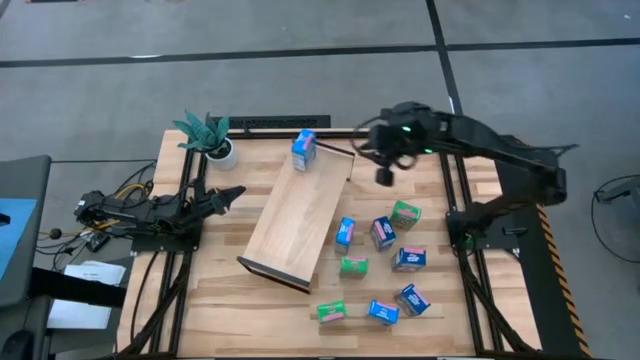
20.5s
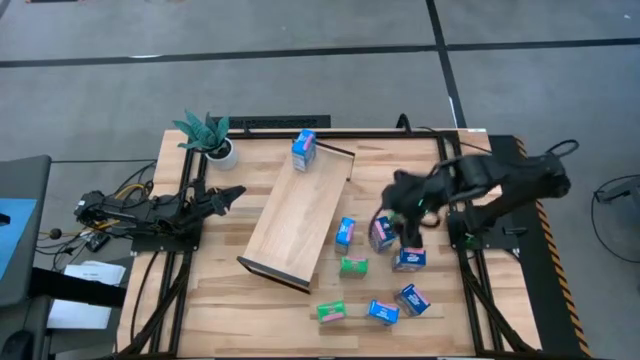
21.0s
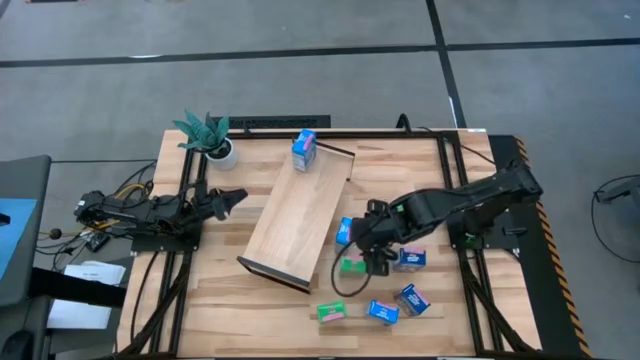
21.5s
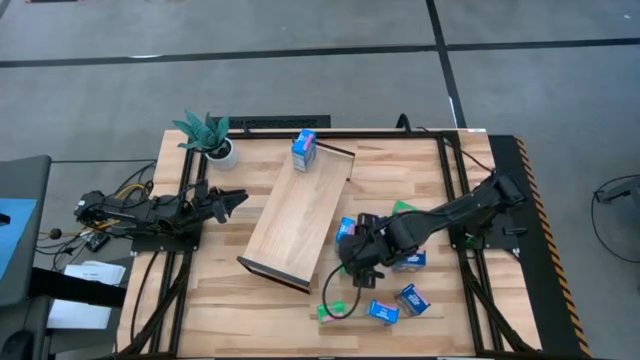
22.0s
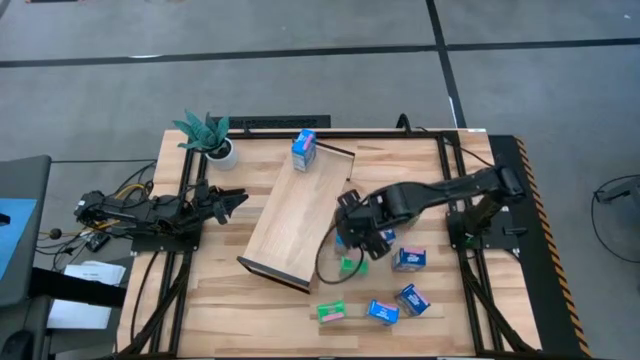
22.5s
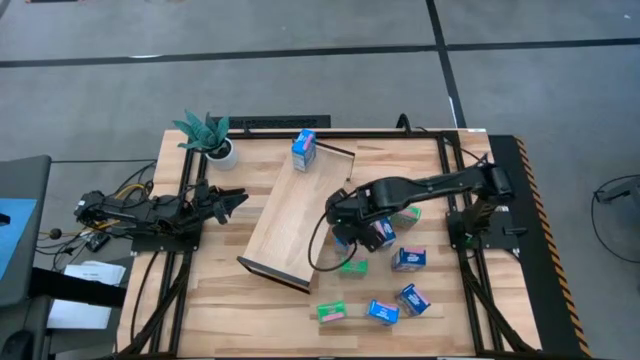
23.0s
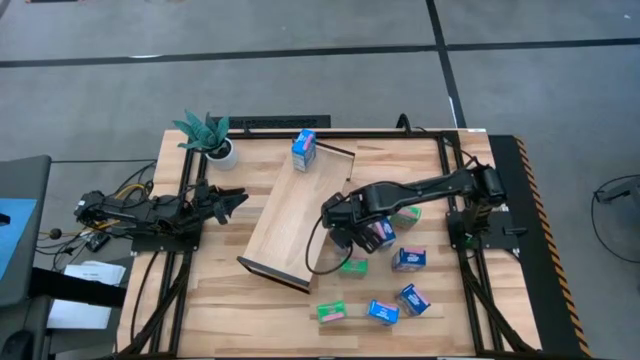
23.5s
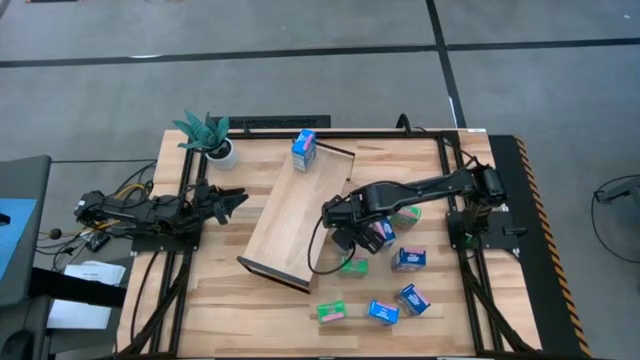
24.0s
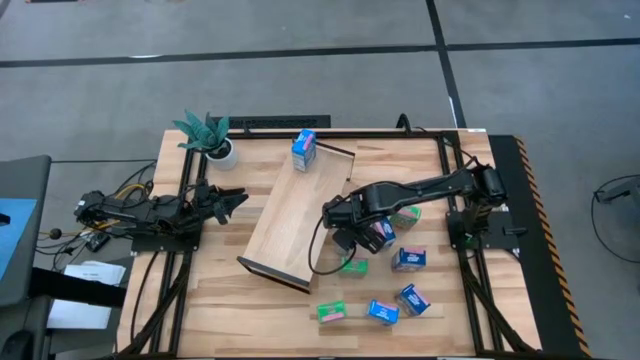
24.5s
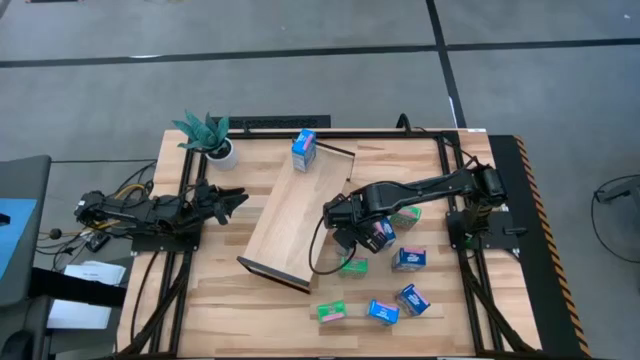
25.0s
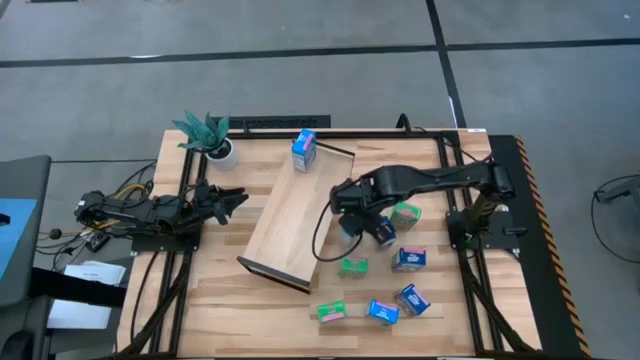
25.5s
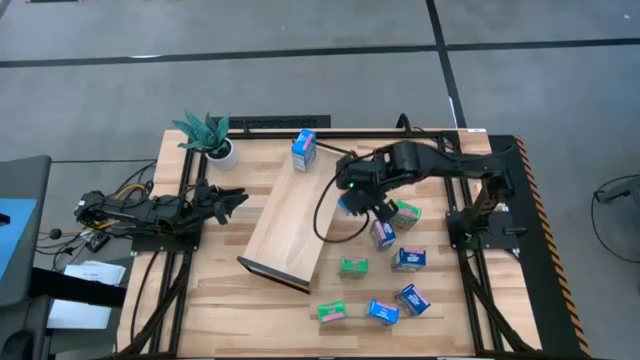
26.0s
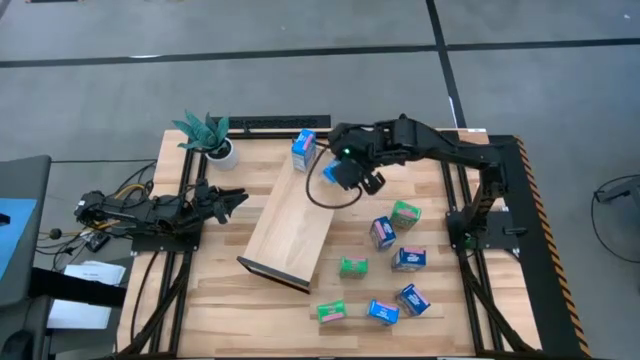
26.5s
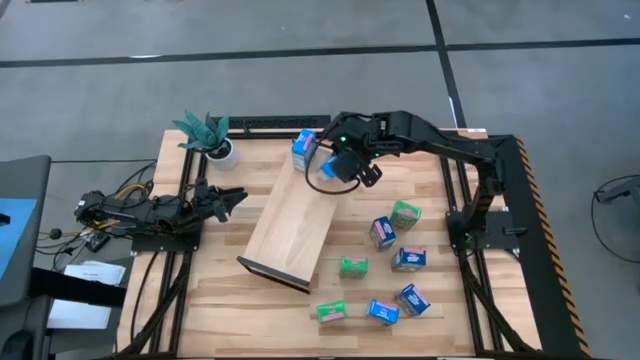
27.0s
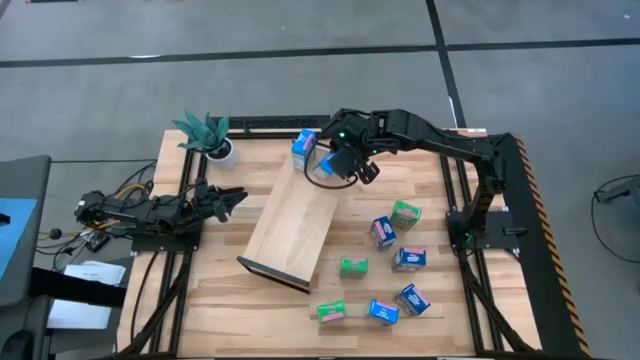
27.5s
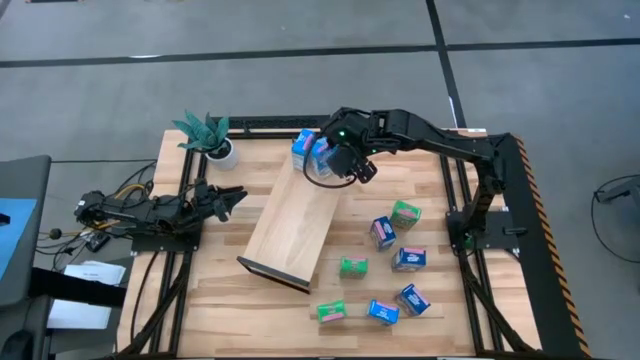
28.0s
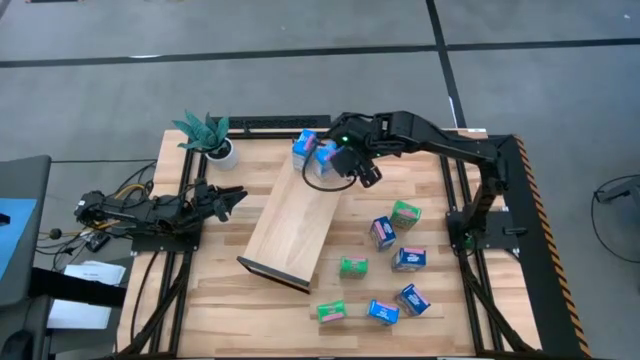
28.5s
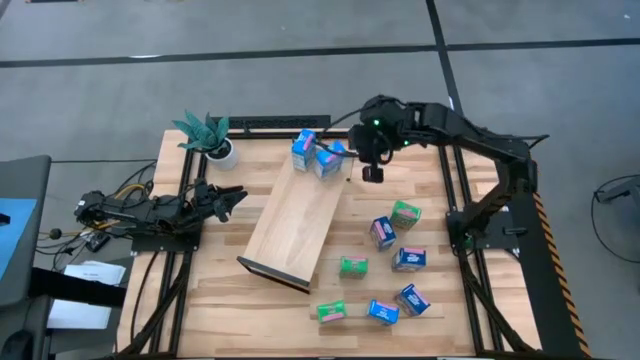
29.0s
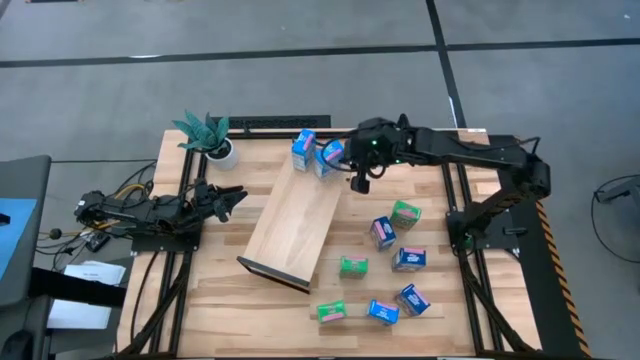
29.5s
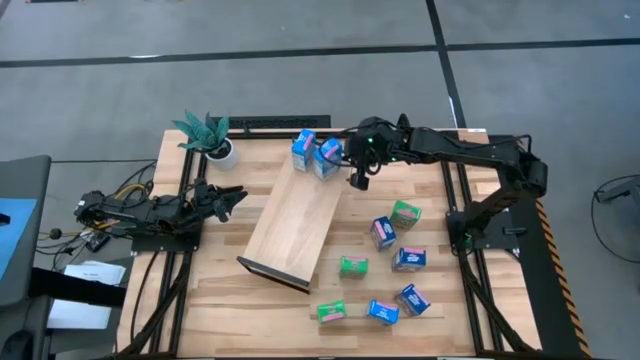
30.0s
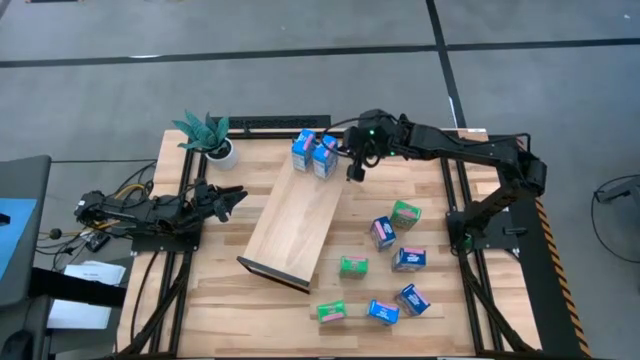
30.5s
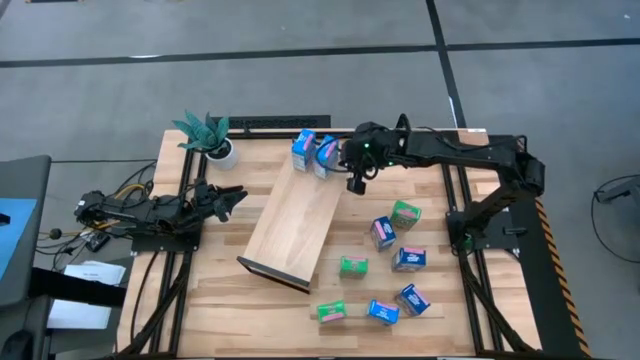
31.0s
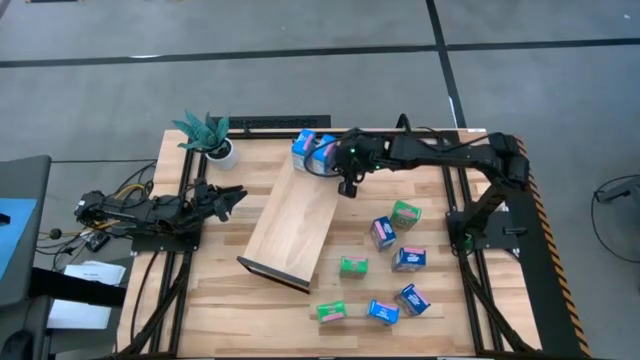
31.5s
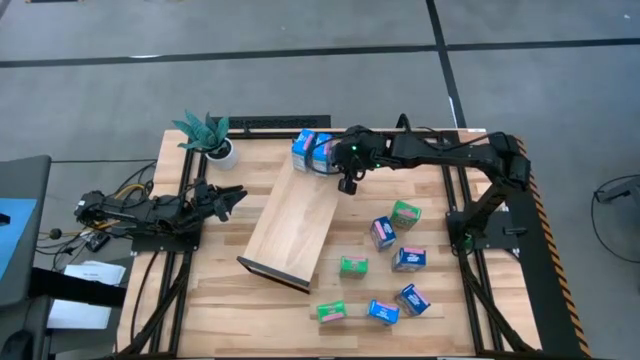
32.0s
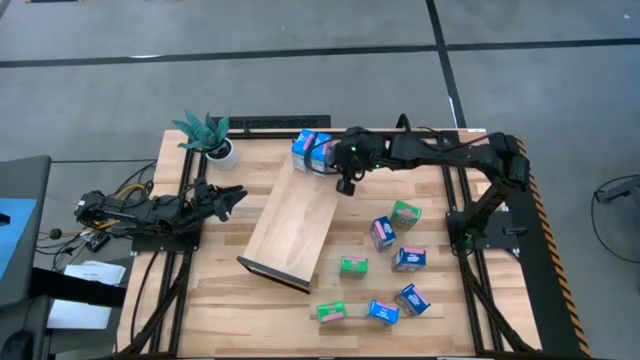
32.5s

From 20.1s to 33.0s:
Task: Stack cereal on shelf
Put the top light blue cereal box on the shelf aligned with the other light blue cereal box

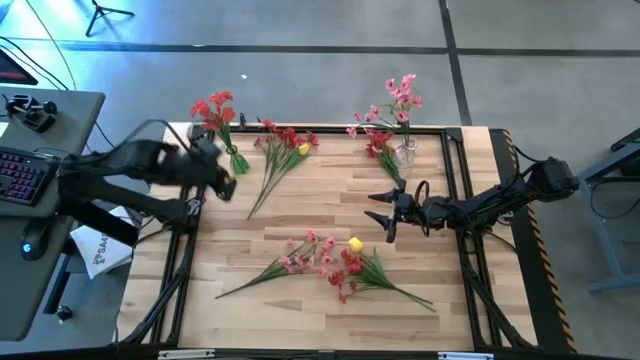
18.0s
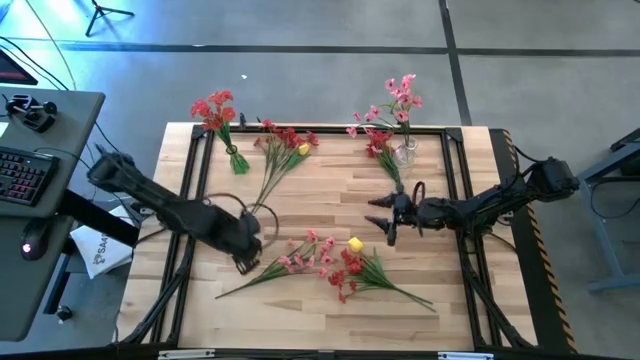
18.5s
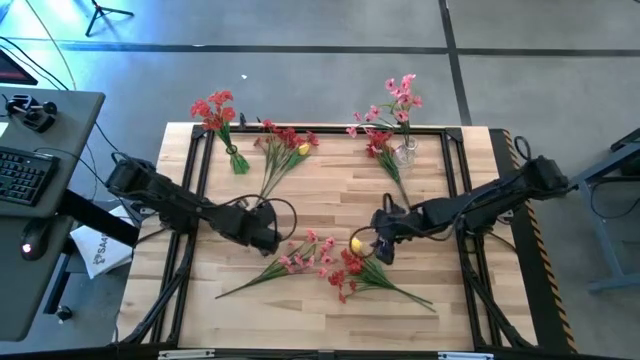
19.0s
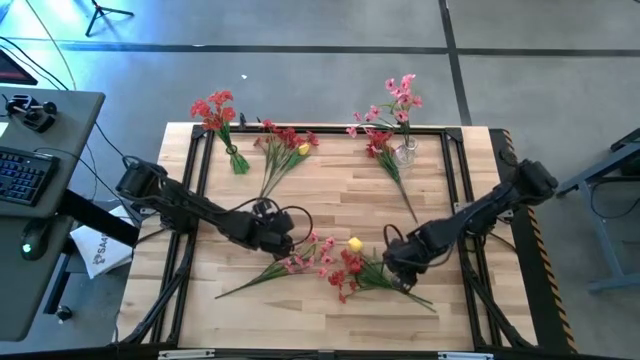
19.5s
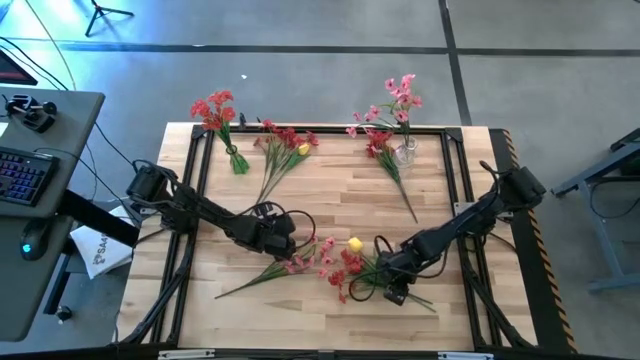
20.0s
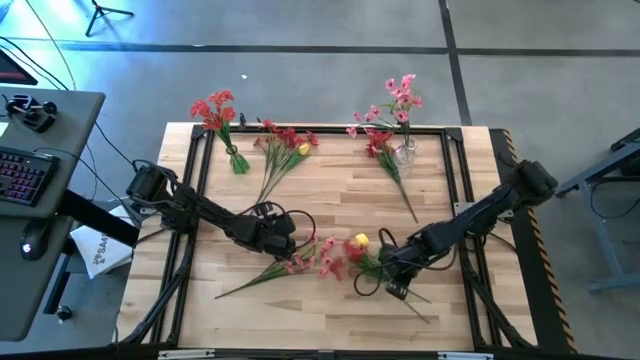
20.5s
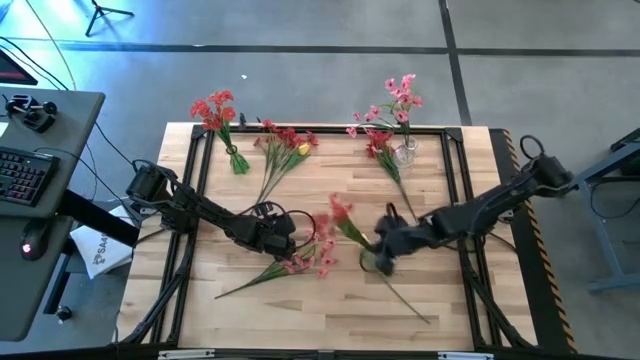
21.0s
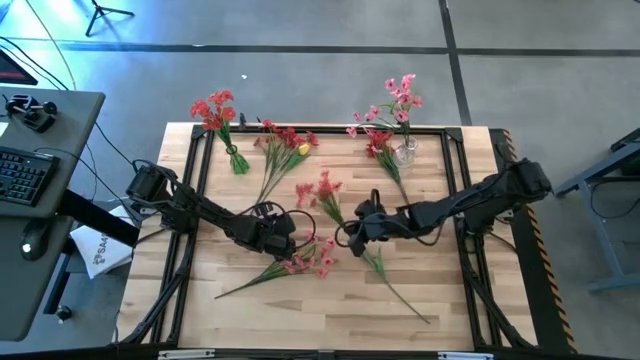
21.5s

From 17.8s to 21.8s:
Task: Sort flowers into vase by color
Move the red flowers to the middle

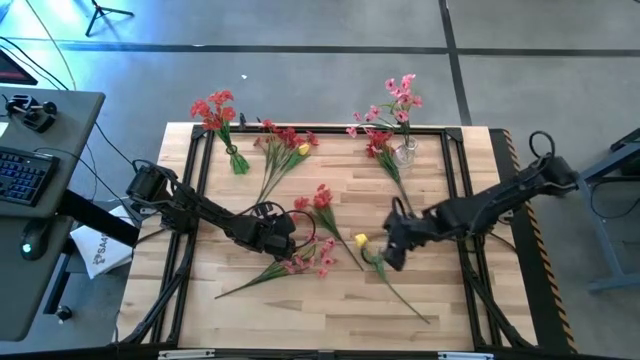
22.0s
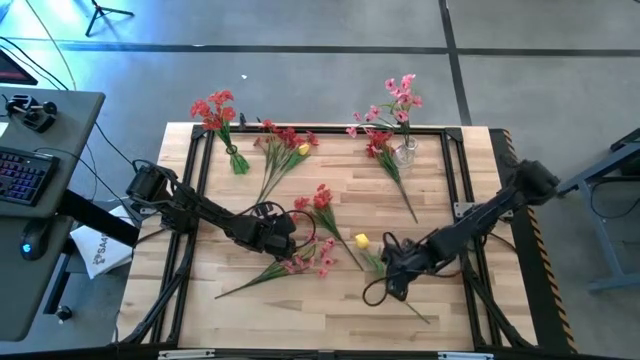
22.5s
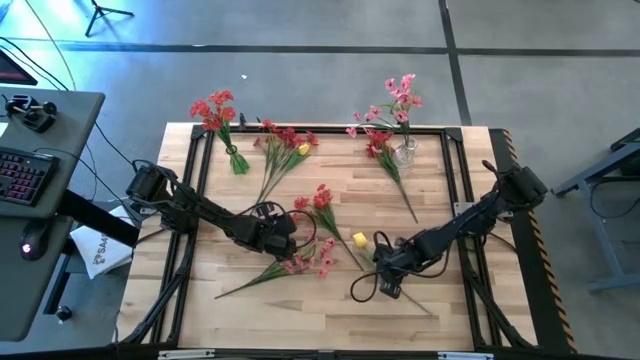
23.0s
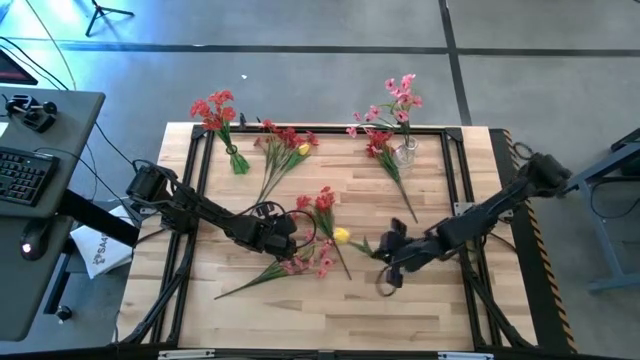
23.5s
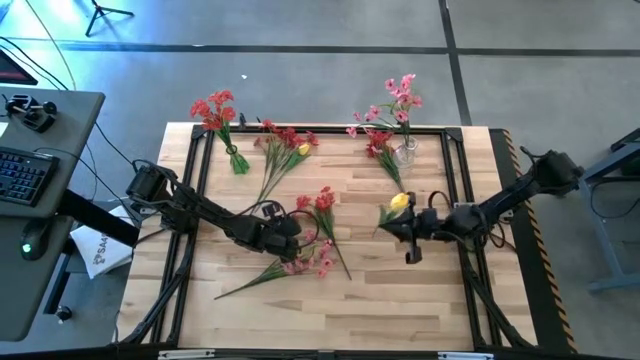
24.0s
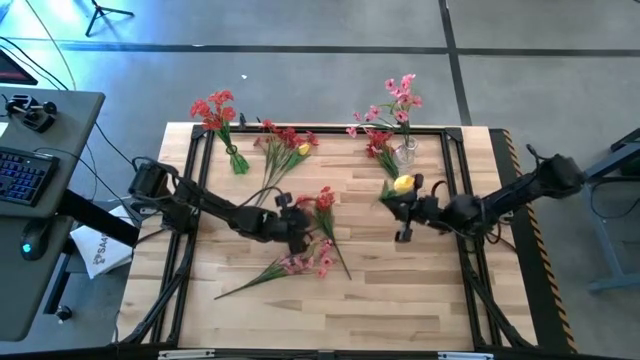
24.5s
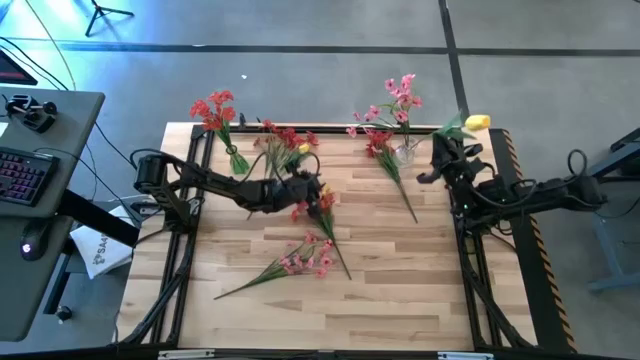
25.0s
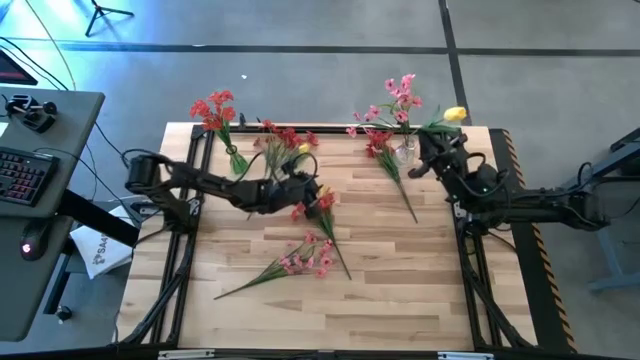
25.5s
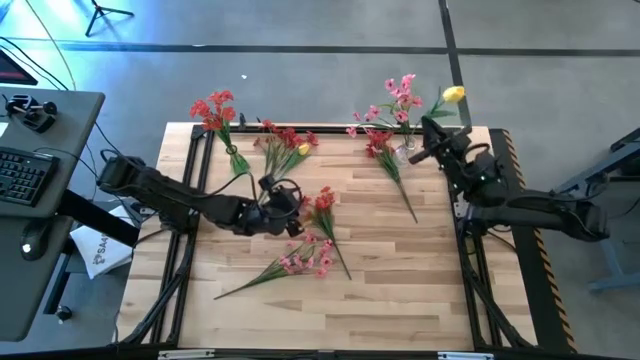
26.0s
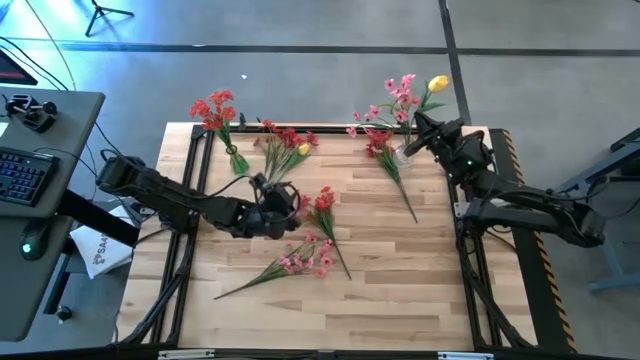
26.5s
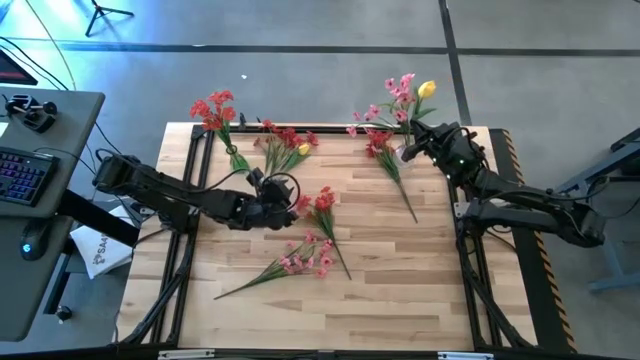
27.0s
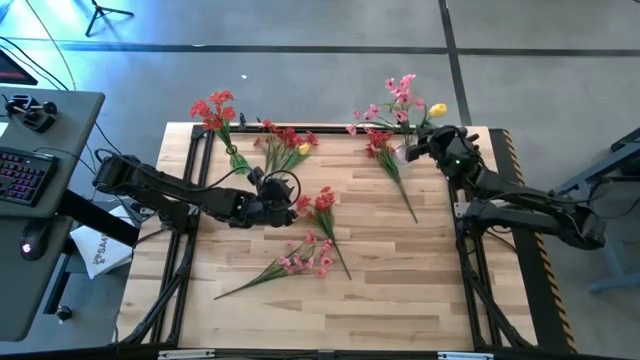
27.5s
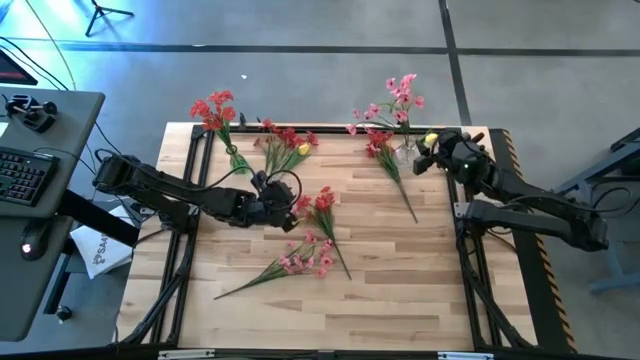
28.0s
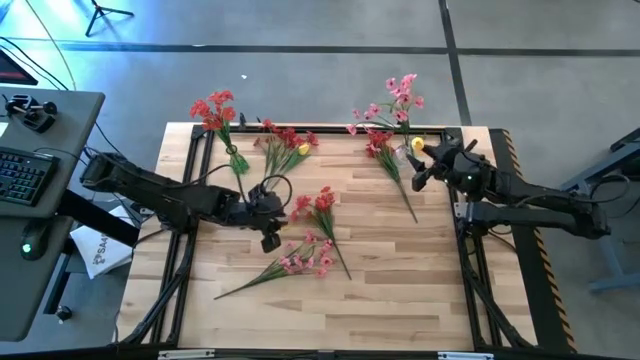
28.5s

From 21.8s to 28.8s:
Put the bottom yellow tulip into the transparent vase
